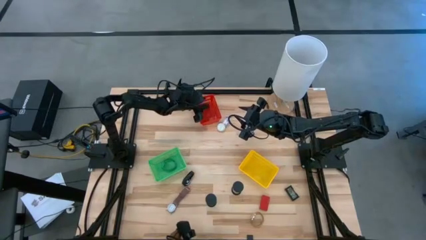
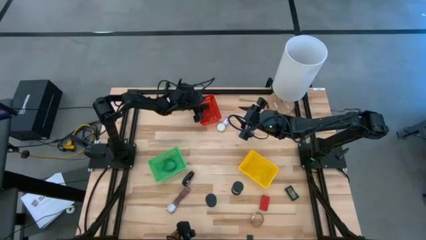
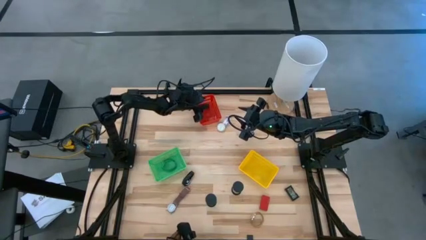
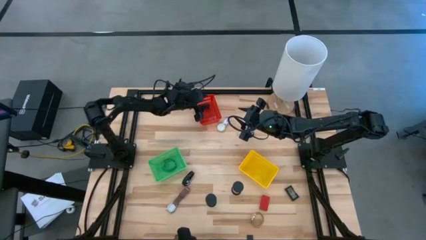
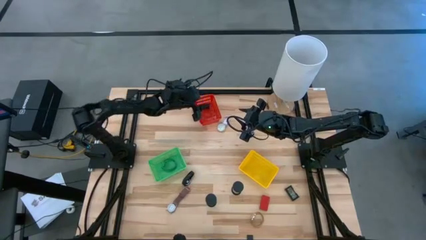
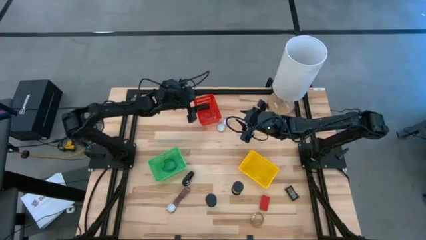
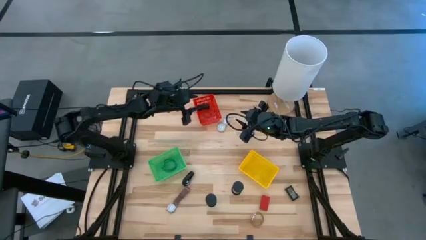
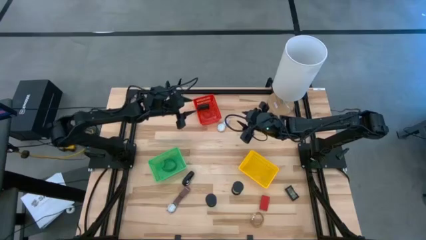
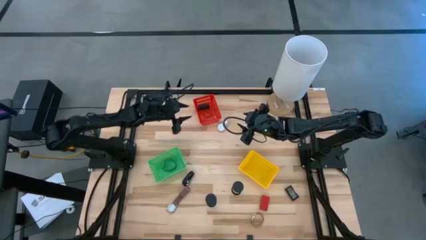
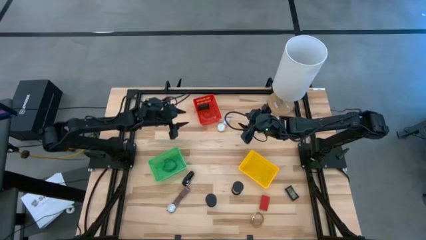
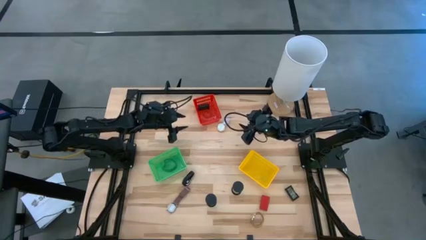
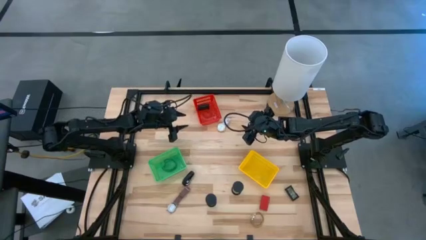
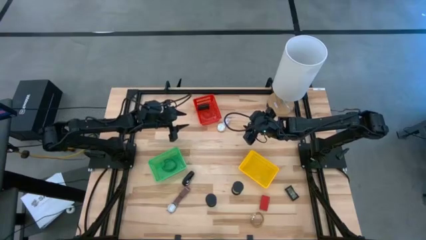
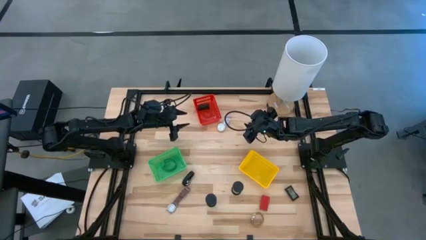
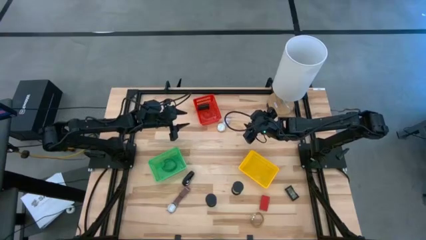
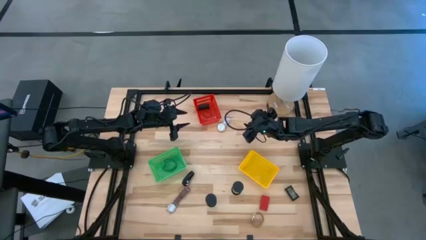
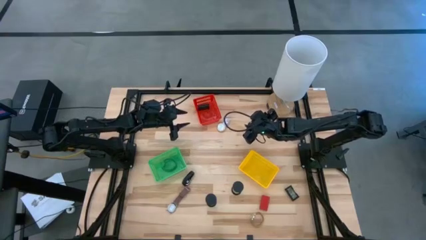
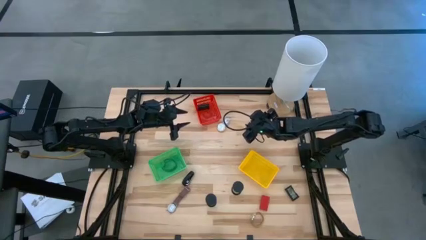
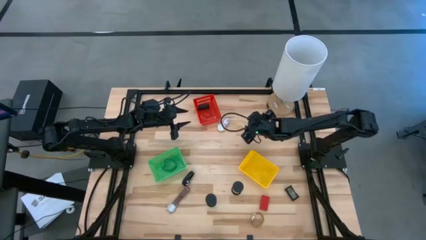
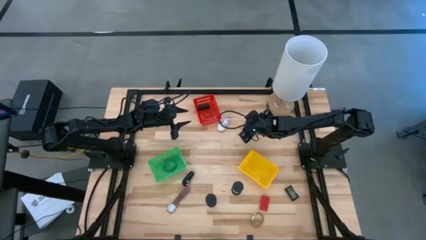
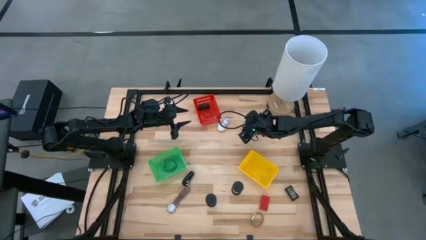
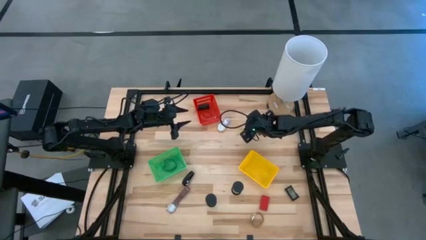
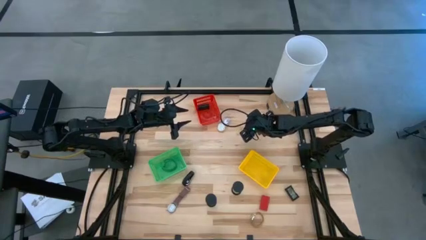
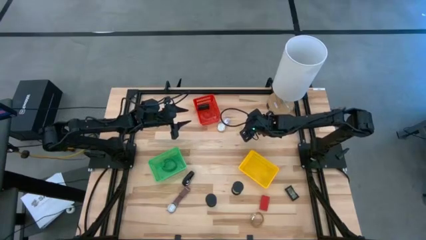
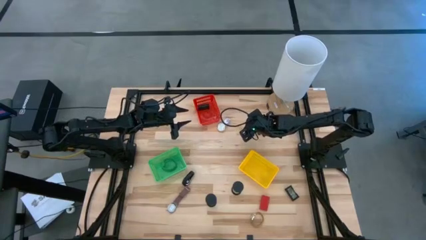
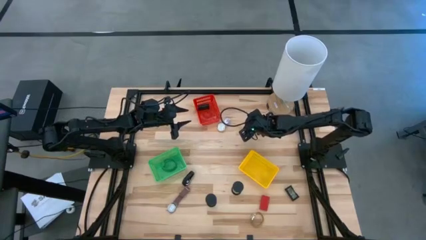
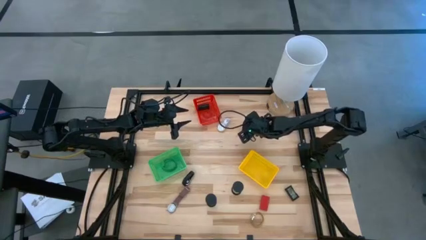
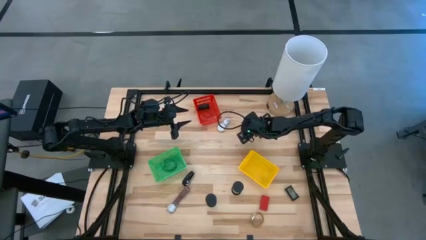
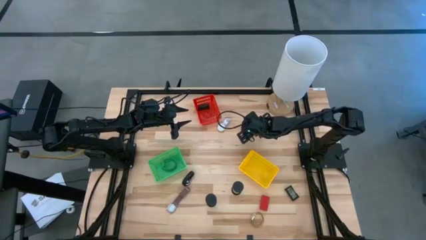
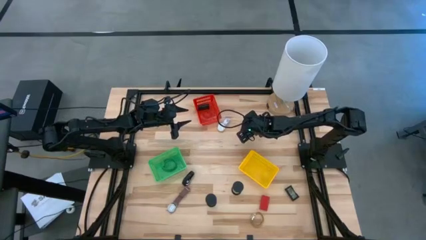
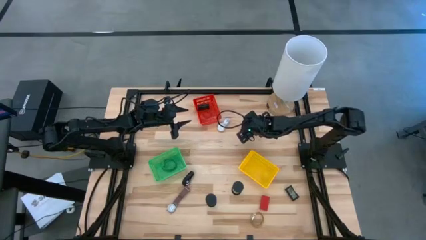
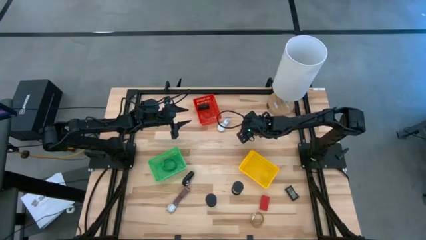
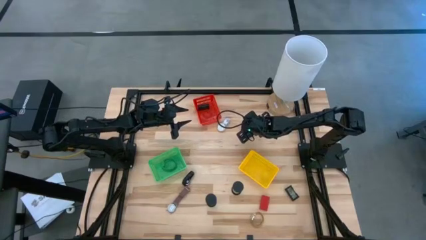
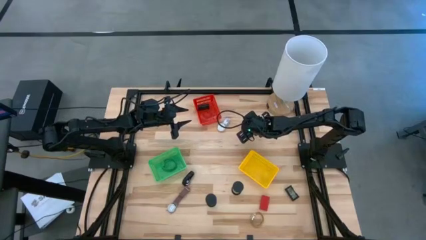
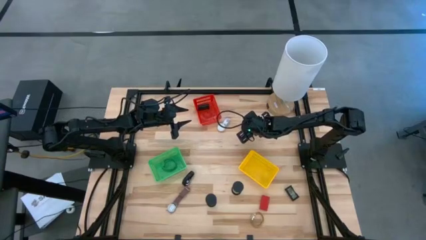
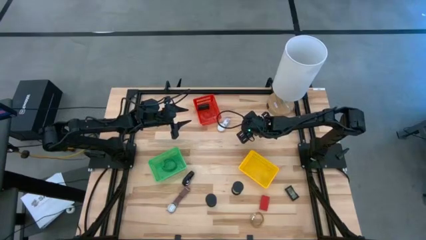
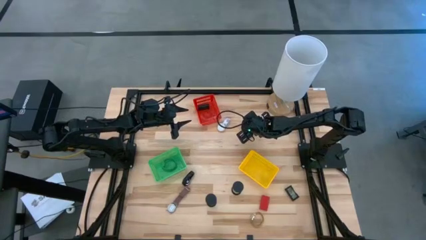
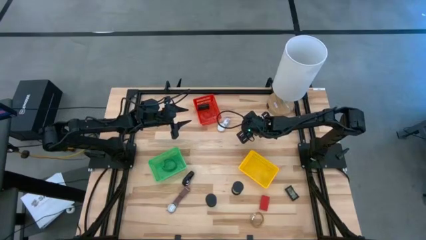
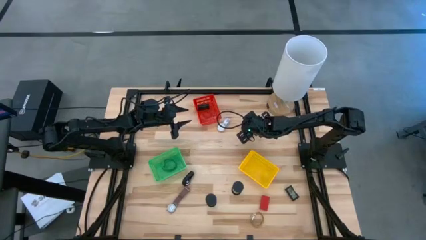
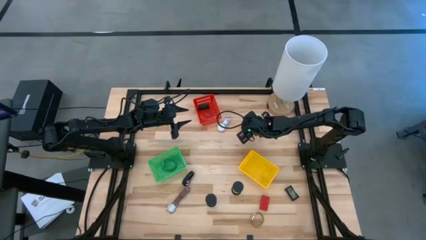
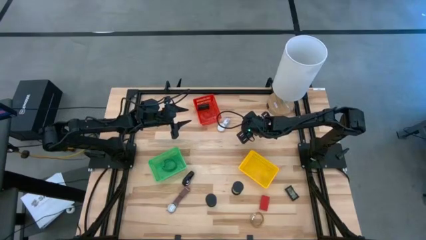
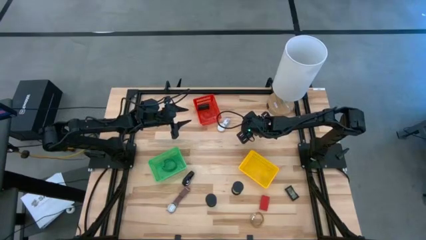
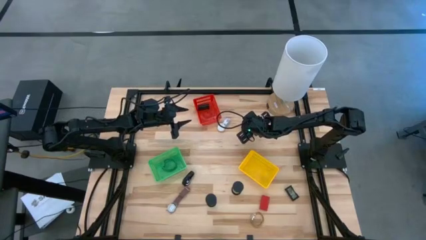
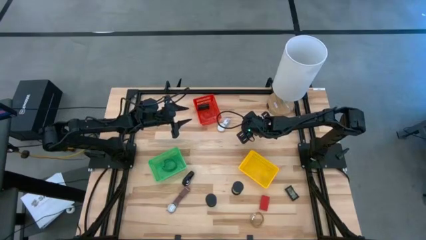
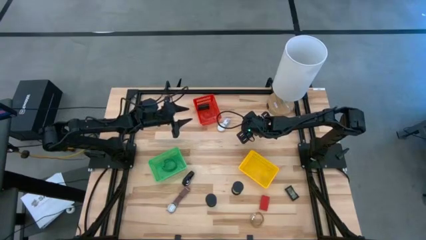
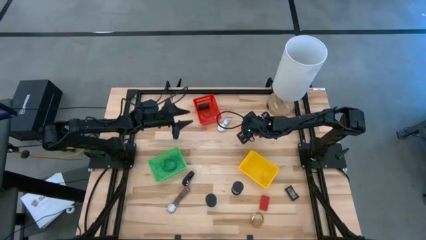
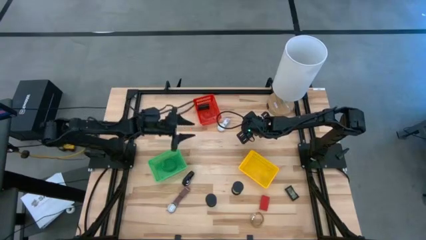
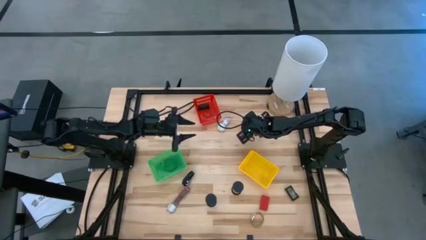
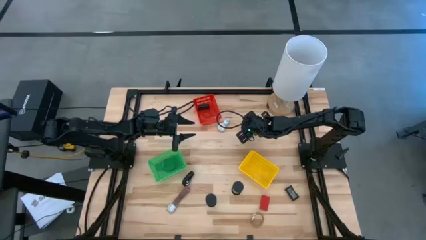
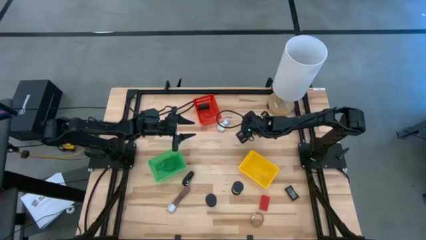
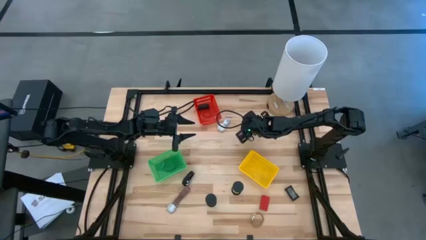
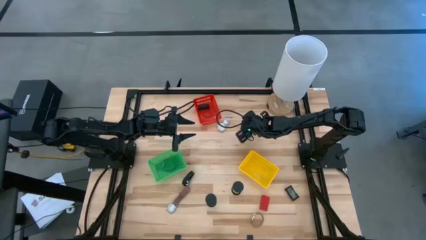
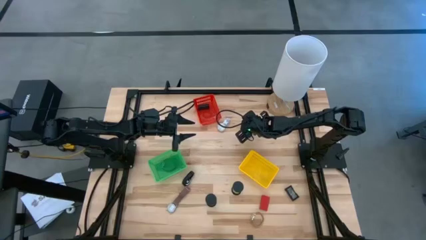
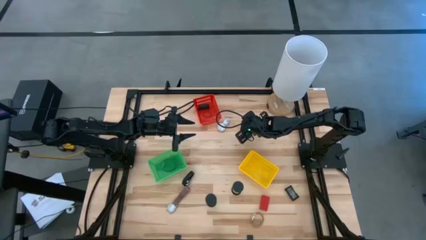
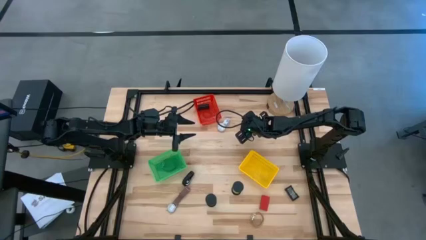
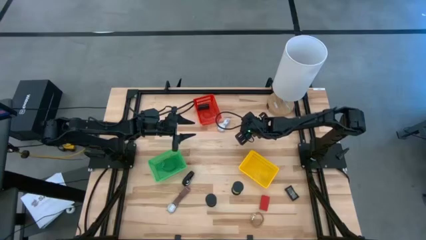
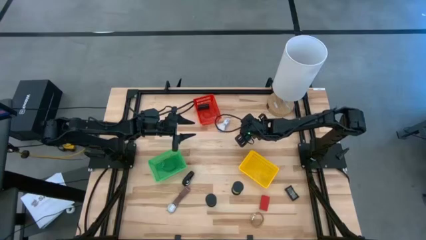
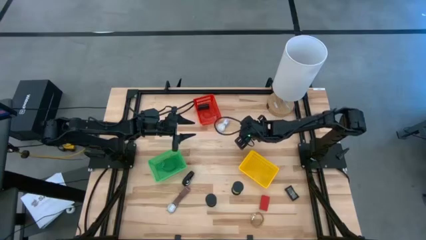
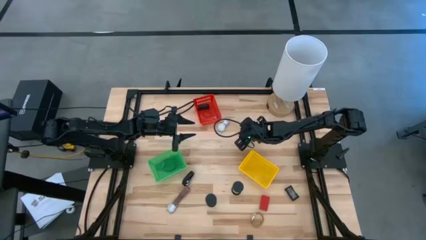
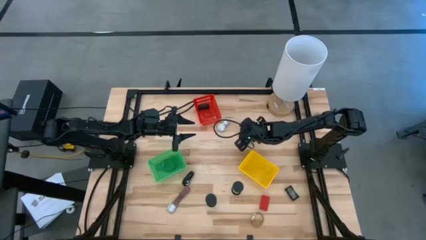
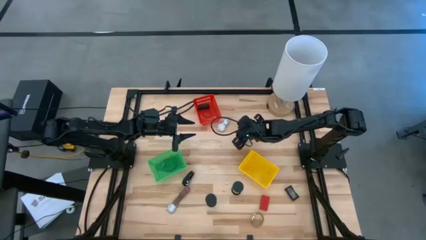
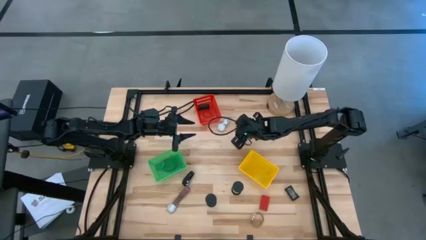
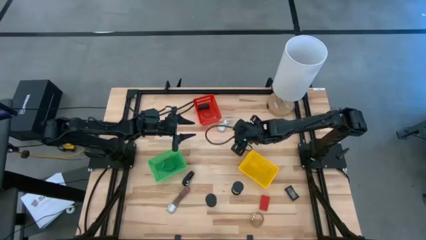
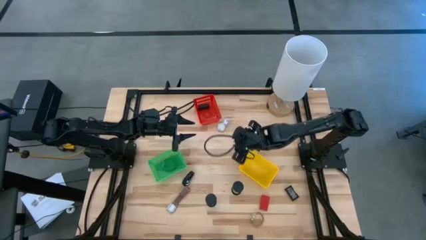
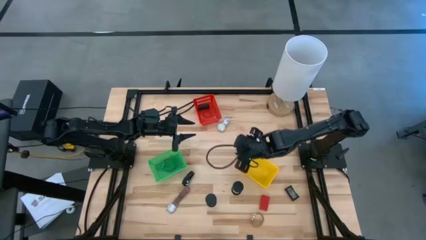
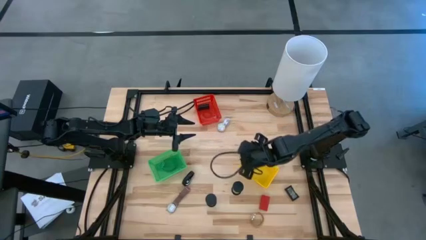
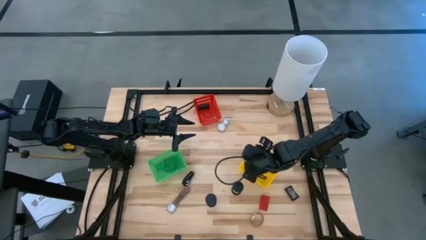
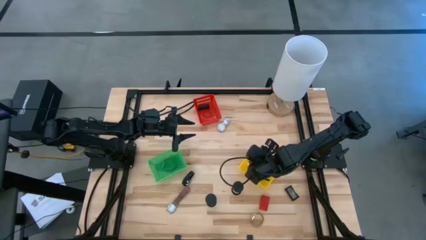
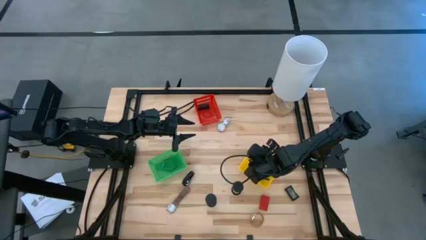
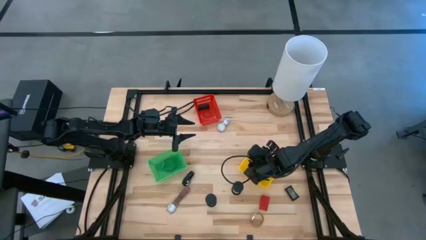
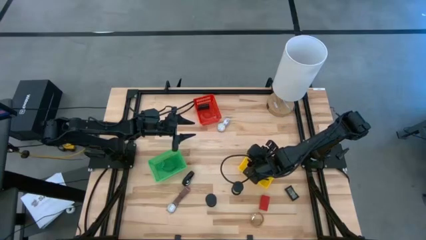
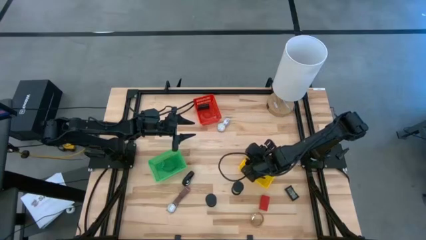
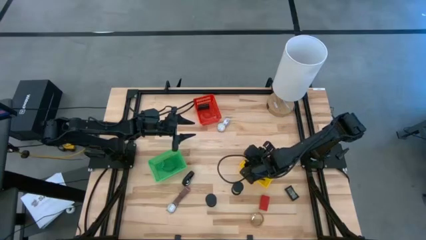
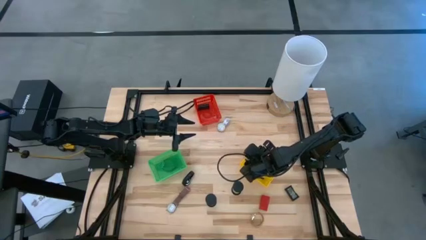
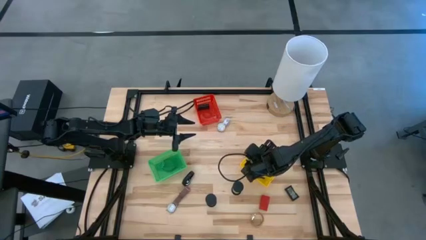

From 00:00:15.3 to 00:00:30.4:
Task: Pick & Place Office items
Put the blue hourglass into the yellow bin
